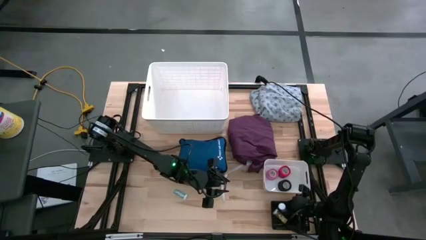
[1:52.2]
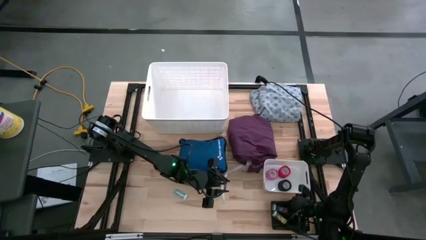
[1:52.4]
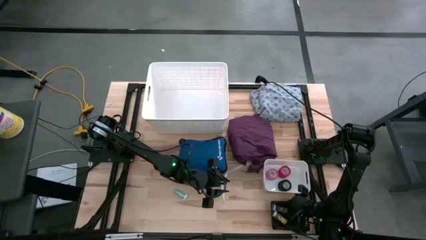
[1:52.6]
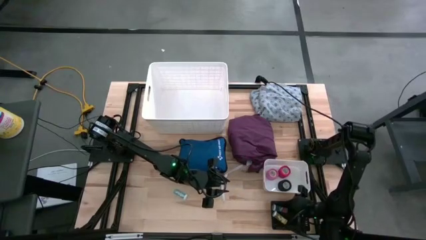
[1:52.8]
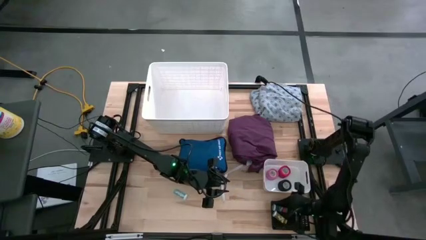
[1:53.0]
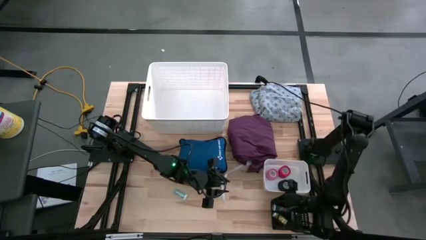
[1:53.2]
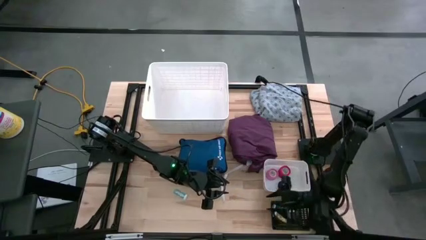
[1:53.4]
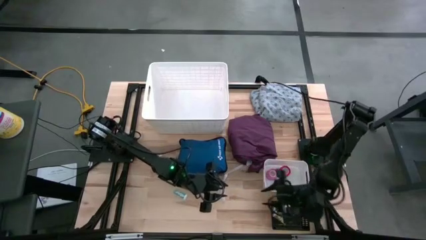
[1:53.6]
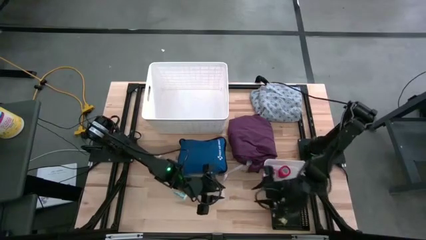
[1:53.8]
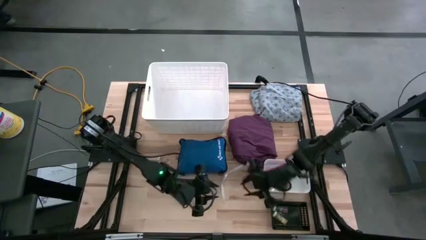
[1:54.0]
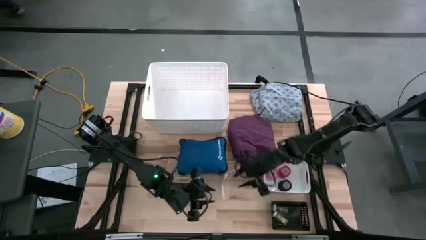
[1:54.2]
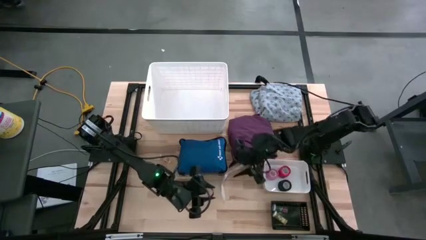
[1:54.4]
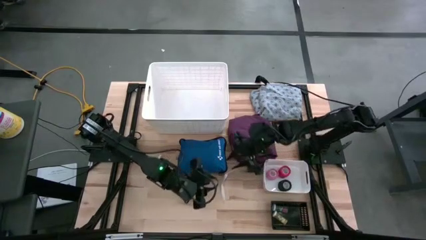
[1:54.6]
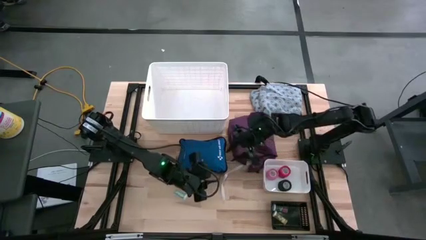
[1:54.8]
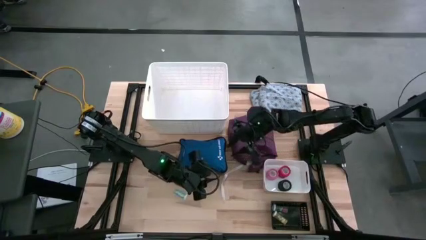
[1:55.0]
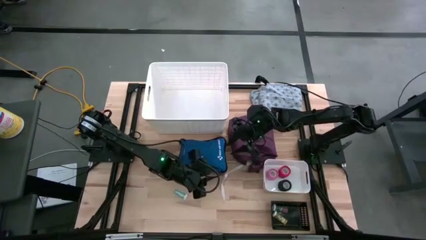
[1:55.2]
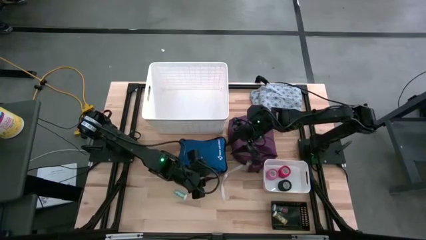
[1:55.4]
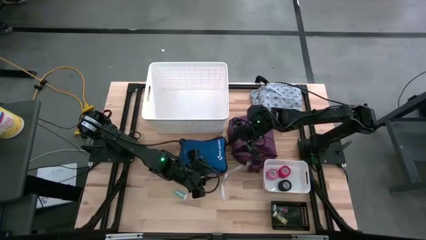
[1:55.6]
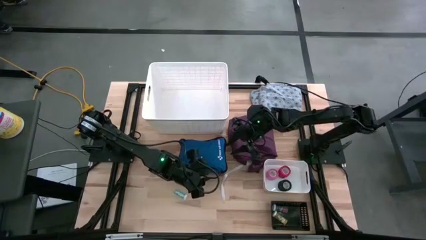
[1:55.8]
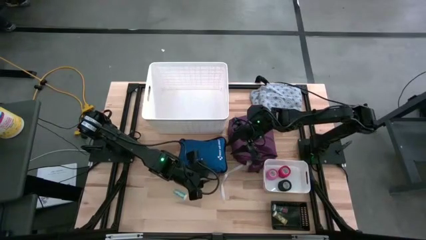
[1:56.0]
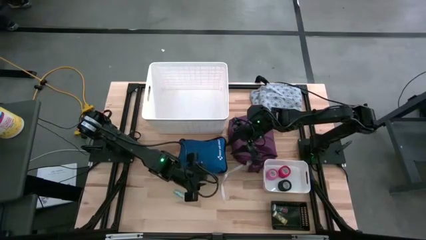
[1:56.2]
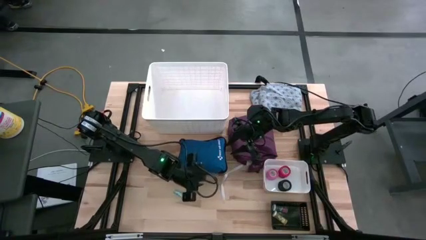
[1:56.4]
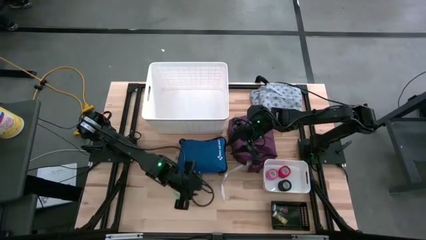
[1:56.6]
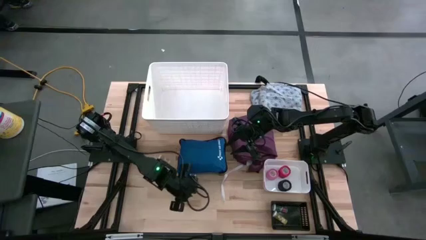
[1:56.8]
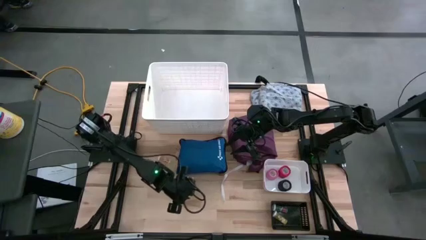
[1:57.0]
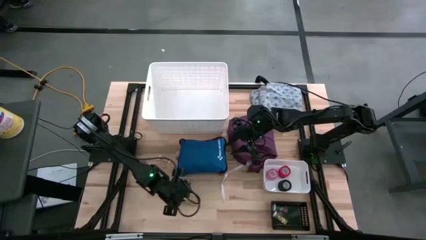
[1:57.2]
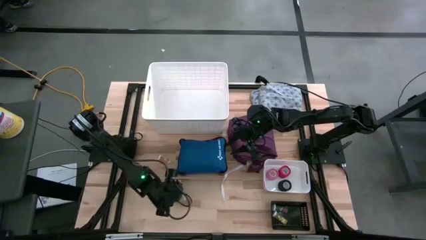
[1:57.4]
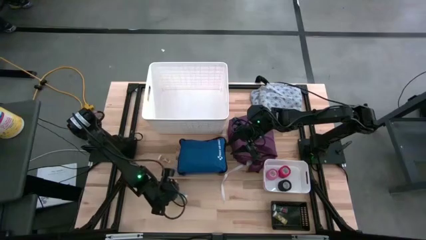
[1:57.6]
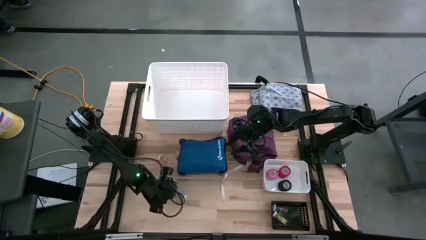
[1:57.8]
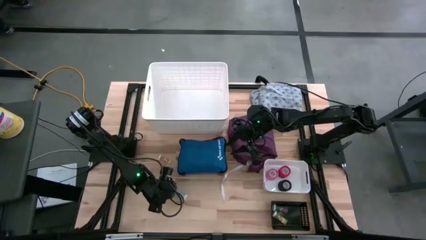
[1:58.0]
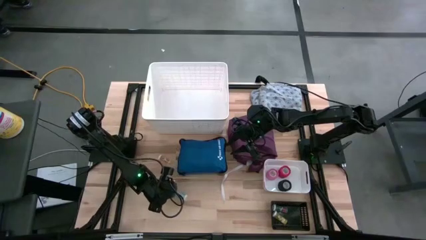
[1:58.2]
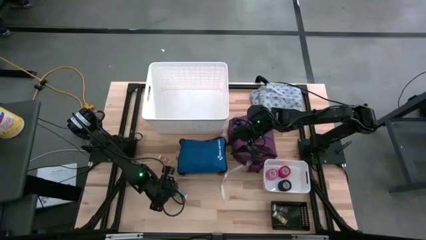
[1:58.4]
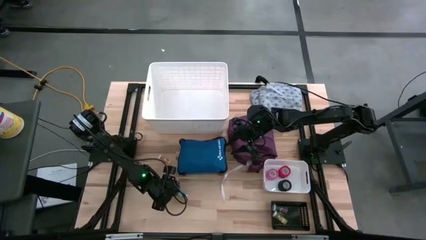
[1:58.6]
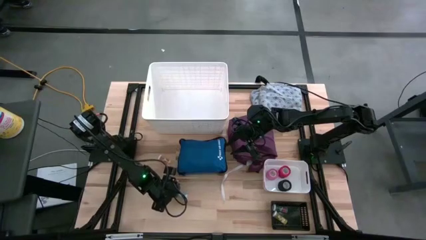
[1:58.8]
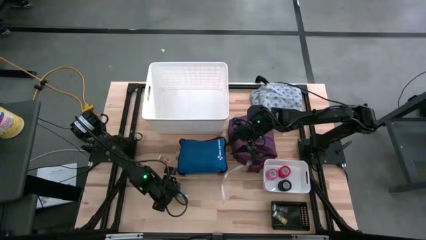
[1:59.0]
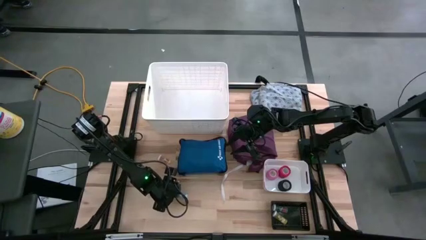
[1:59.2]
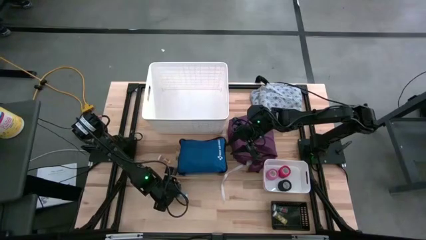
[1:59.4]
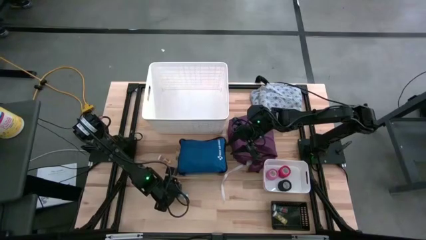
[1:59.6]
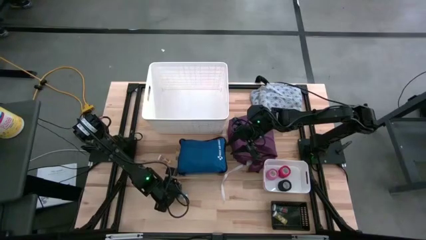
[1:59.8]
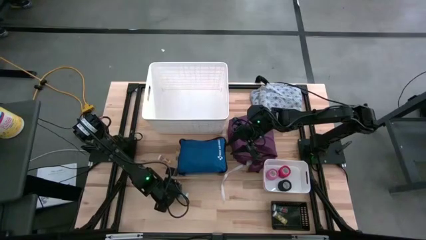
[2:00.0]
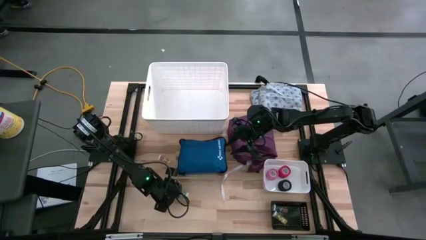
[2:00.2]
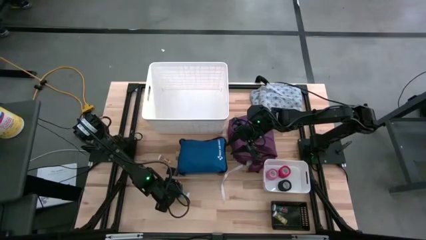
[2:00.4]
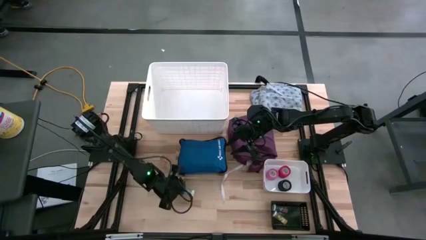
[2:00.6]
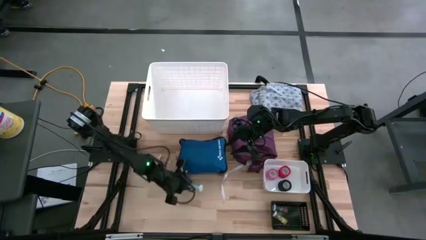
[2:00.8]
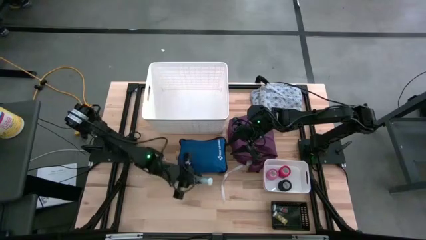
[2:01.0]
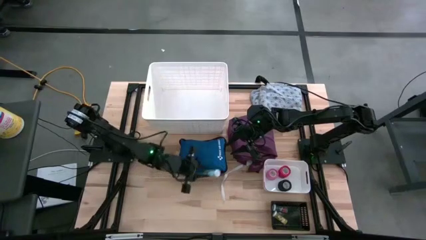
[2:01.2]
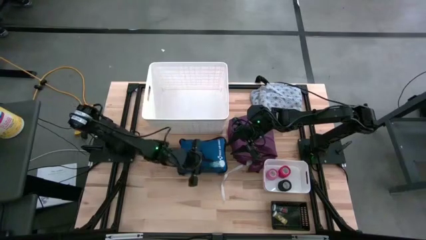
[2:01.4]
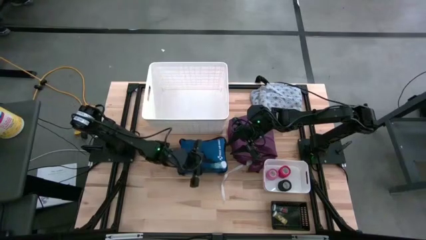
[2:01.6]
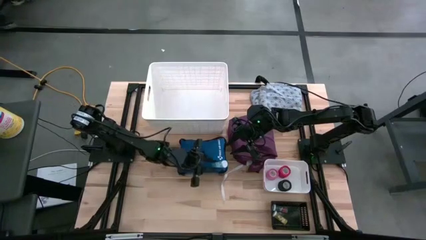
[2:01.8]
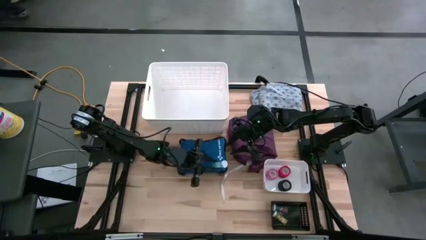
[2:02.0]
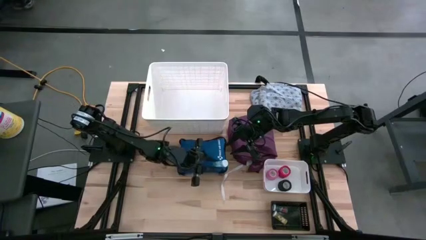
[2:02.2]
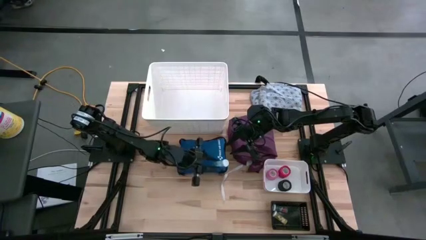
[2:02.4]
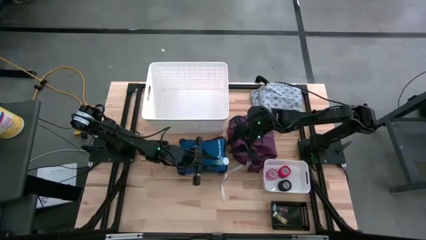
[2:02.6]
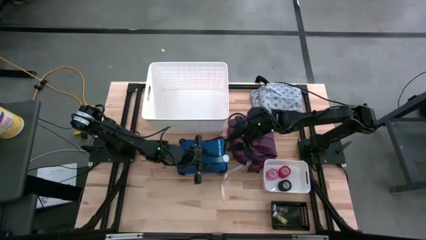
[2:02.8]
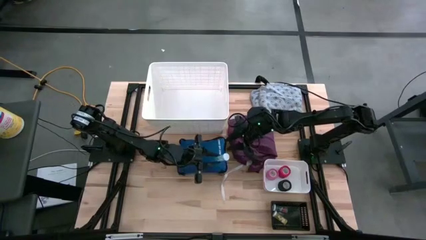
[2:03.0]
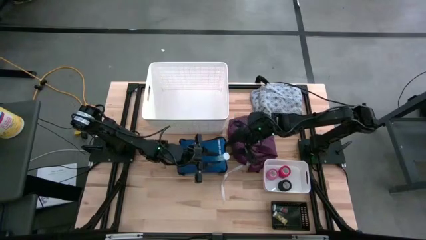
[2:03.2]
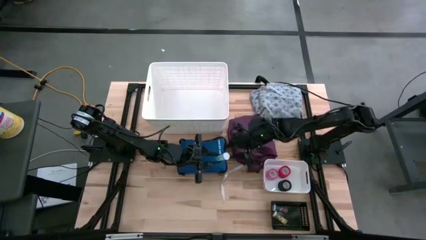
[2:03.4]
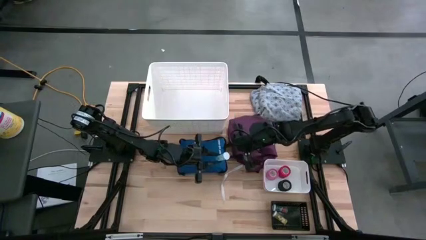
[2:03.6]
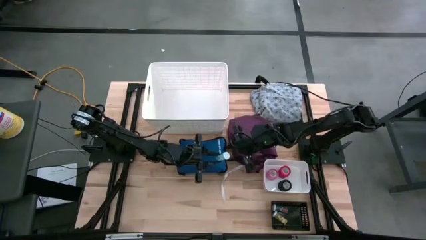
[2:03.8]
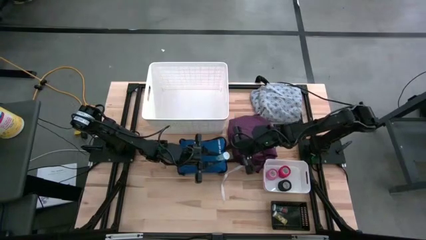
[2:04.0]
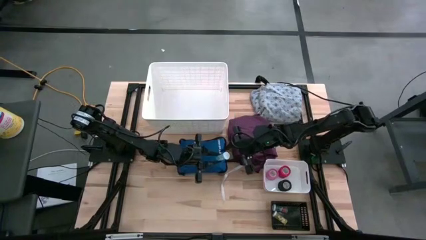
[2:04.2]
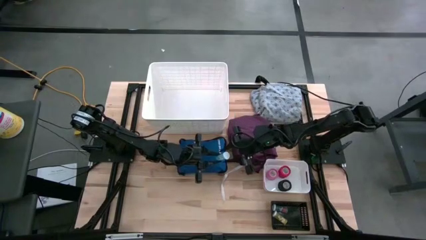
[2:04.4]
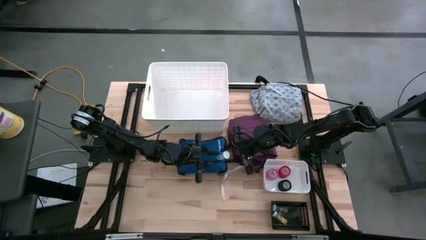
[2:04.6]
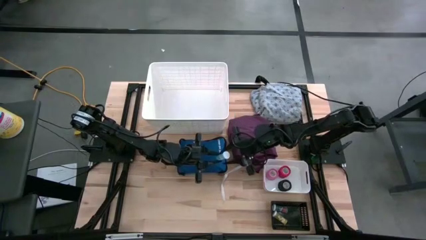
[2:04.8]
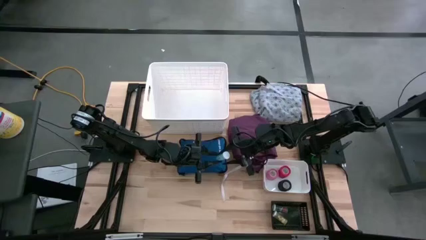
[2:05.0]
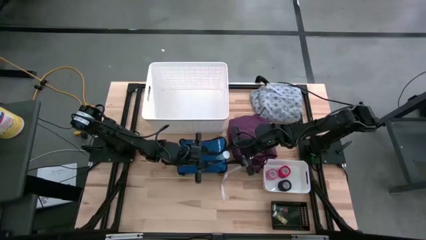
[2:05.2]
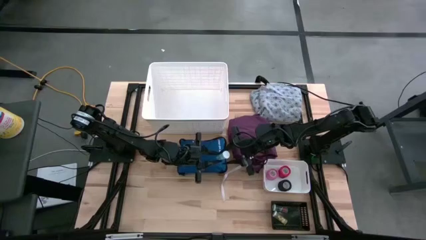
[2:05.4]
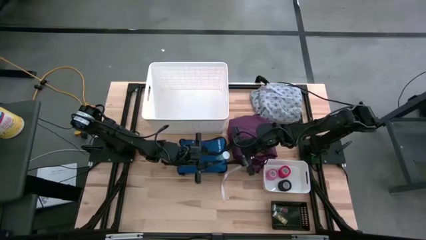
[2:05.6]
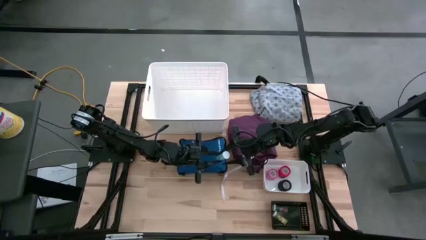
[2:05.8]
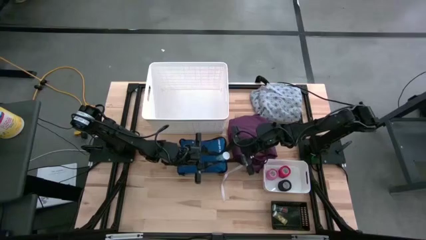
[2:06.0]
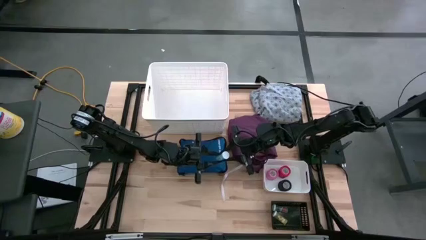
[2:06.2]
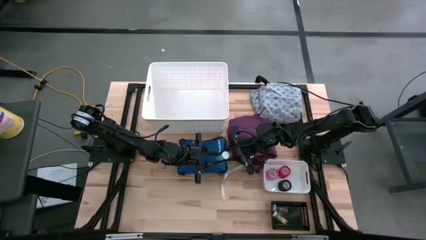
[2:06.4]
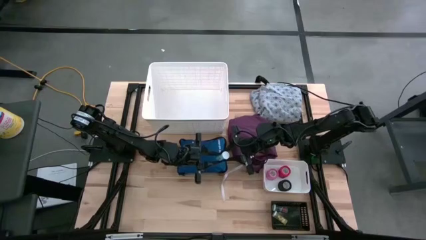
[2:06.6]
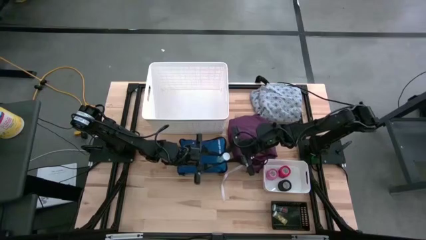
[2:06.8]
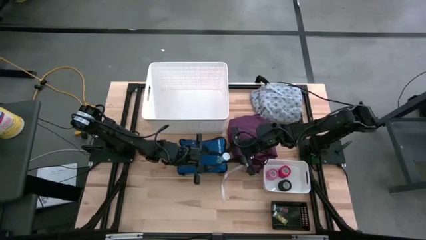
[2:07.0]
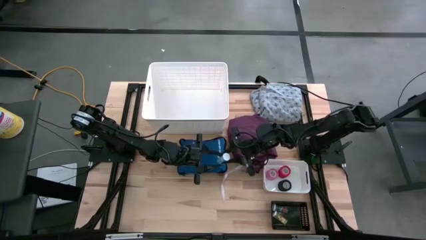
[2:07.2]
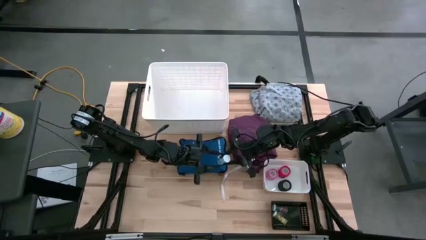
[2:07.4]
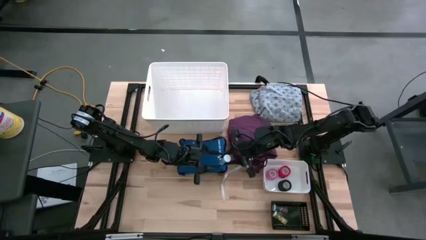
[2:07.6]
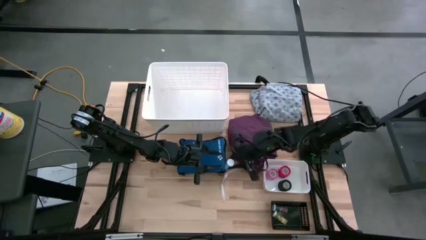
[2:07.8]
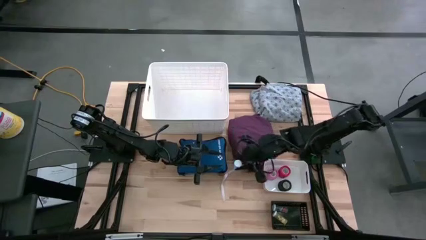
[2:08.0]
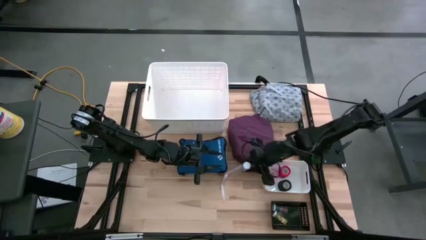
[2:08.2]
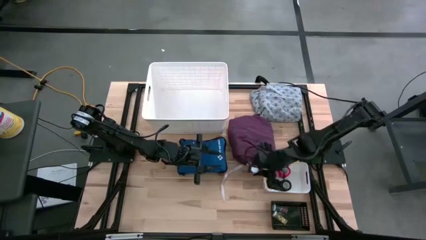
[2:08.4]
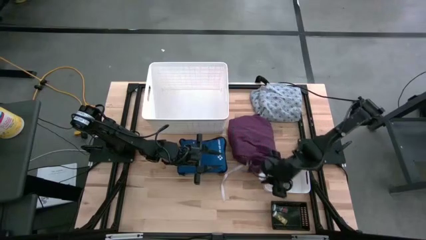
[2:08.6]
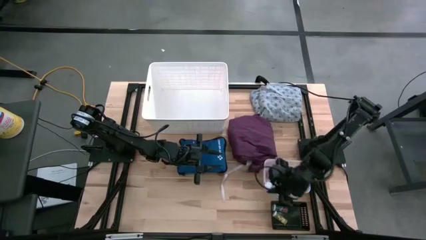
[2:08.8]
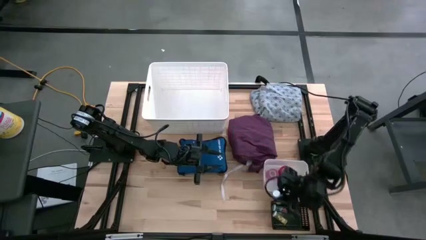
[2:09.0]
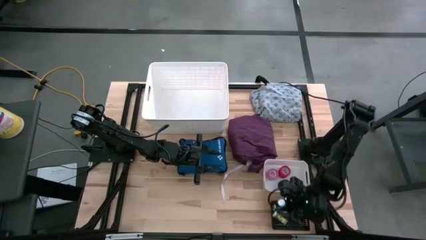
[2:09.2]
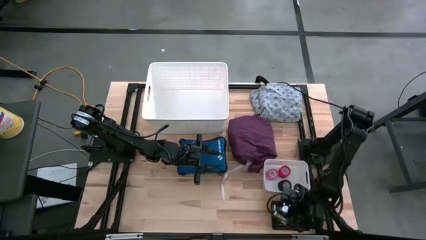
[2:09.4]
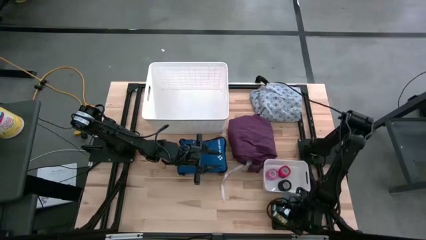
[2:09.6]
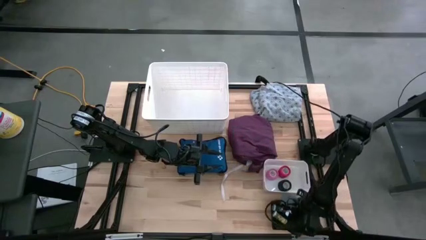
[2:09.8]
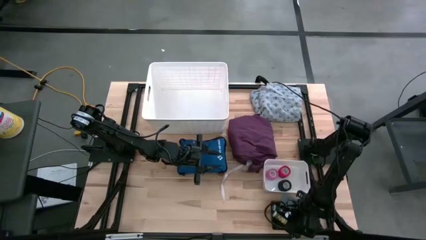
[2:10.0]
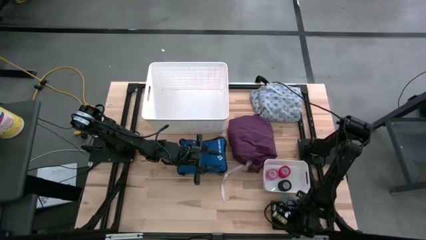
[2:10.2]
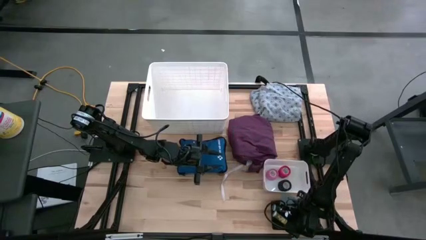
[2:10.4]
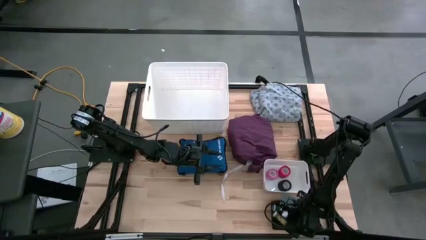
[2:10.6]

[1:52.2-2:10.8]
Task: Pick & Place Medicine items
Put the blue pill bottle into the black bin
